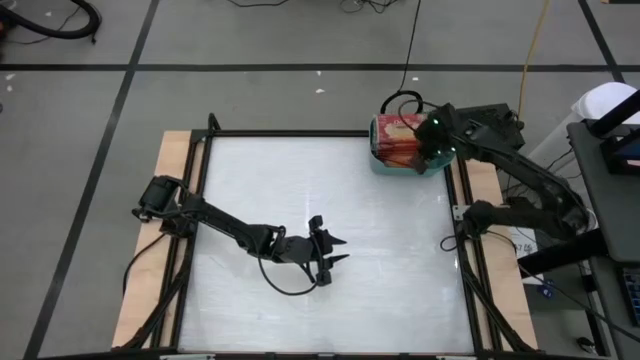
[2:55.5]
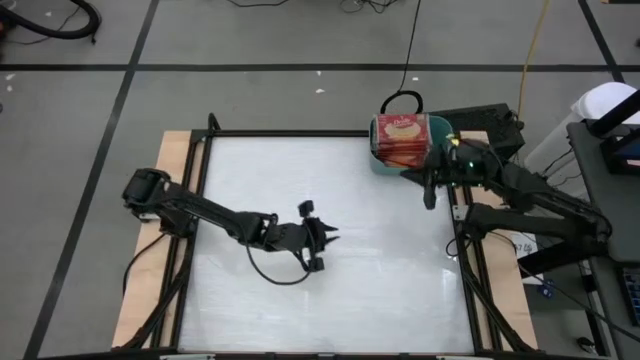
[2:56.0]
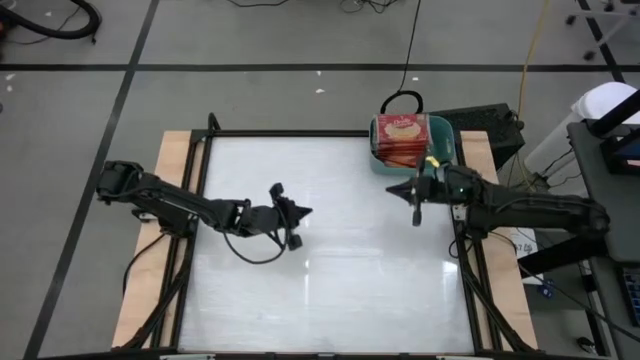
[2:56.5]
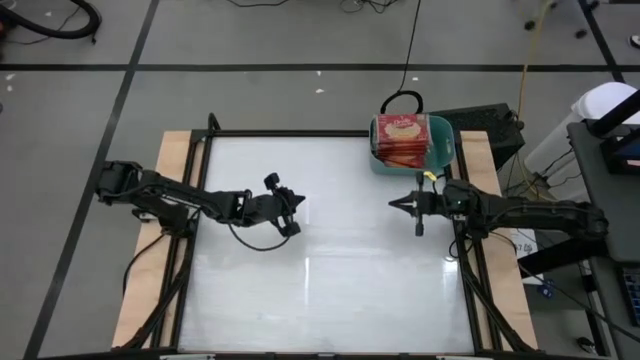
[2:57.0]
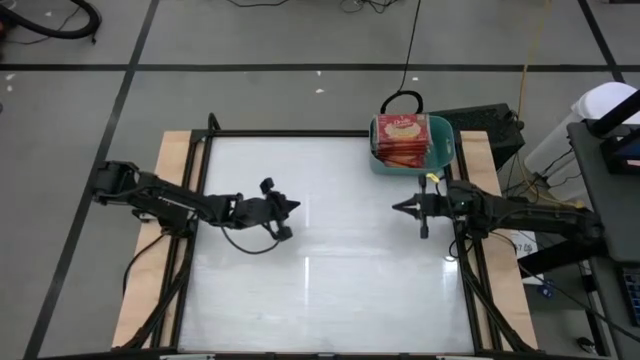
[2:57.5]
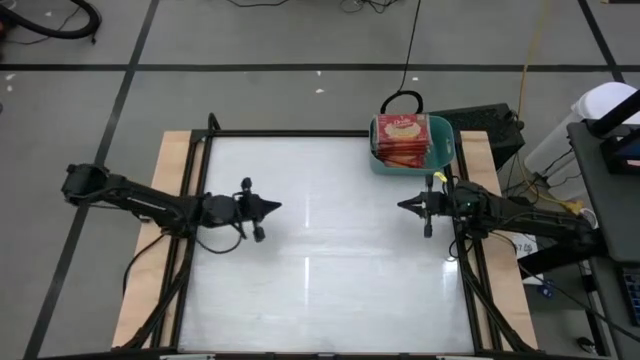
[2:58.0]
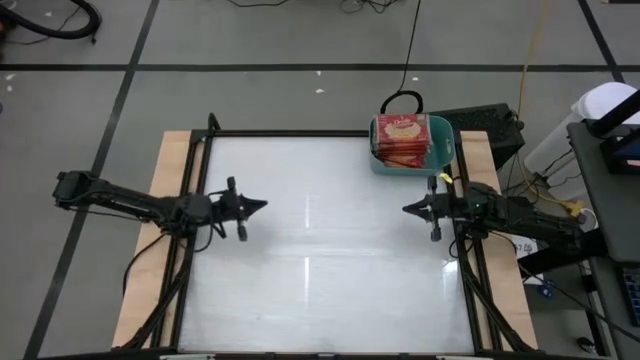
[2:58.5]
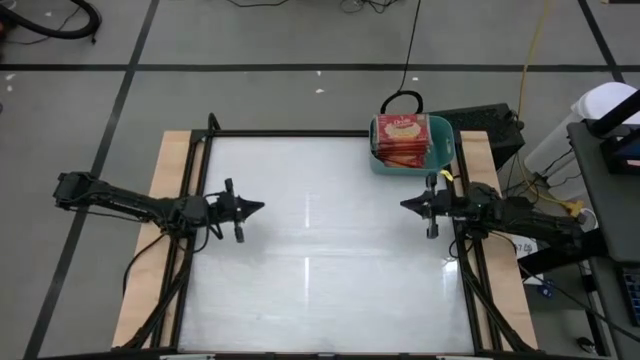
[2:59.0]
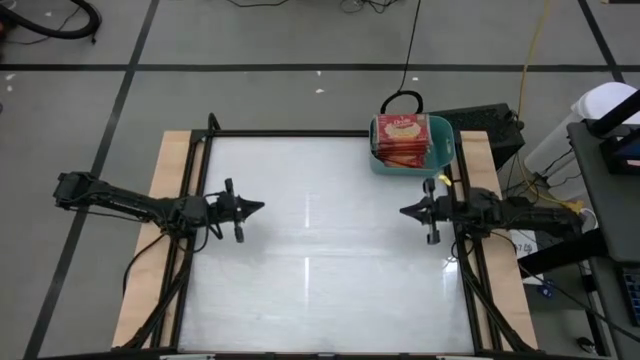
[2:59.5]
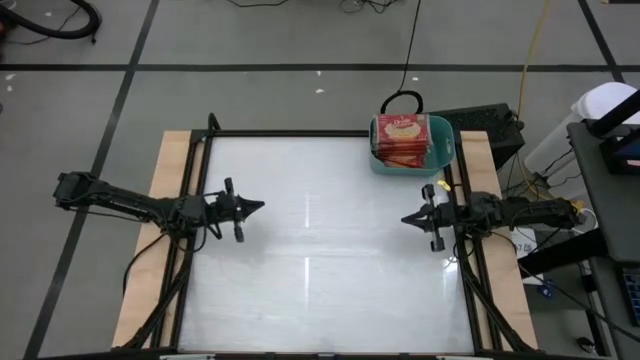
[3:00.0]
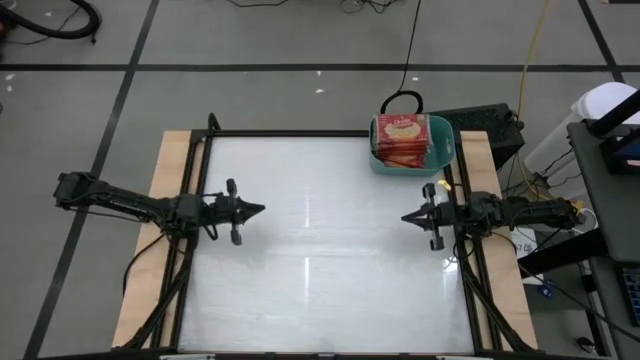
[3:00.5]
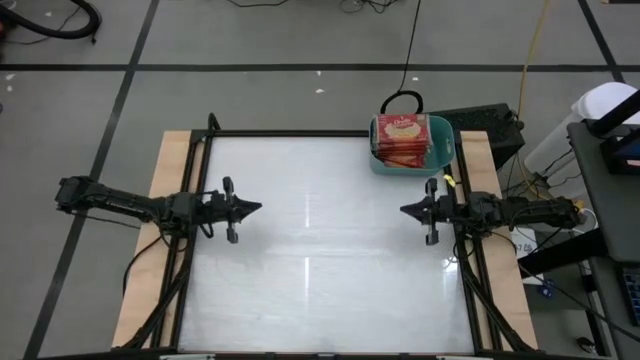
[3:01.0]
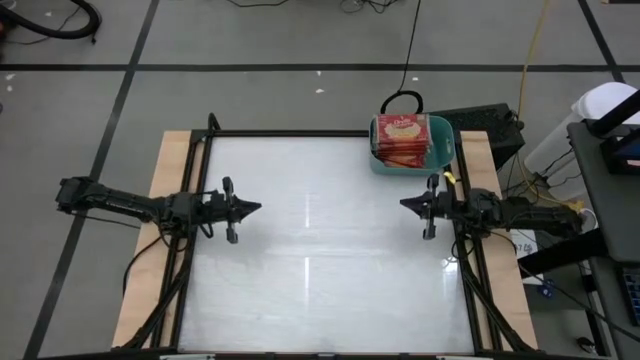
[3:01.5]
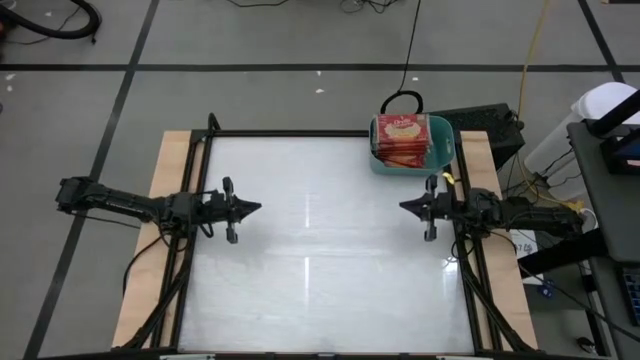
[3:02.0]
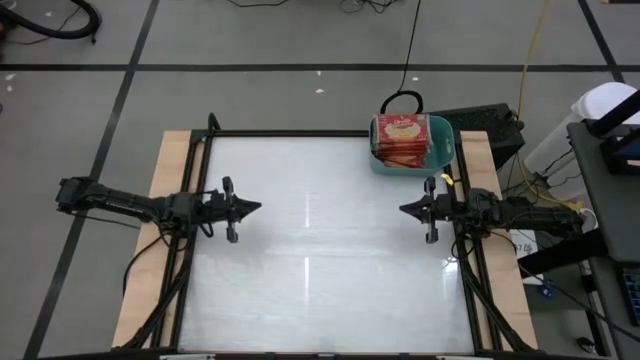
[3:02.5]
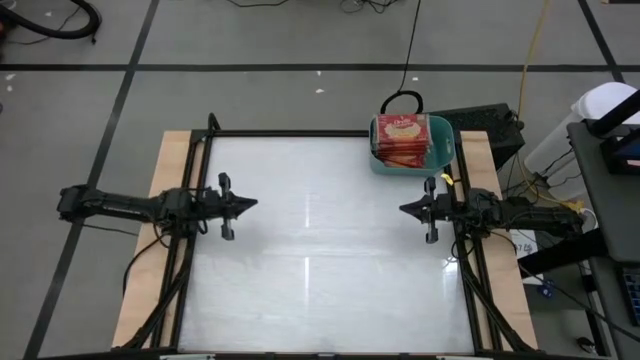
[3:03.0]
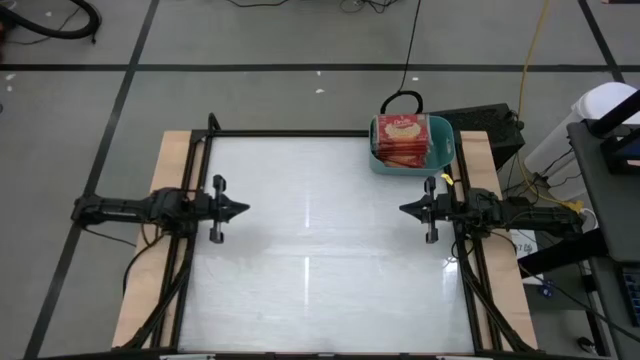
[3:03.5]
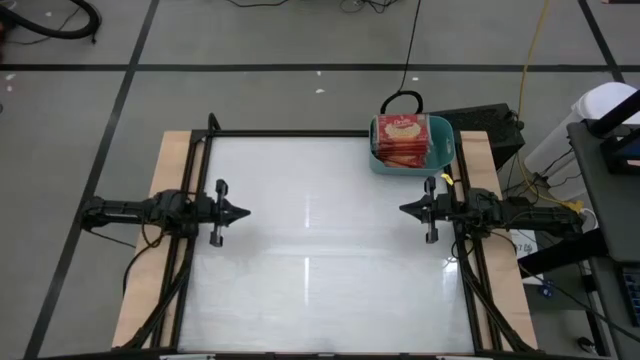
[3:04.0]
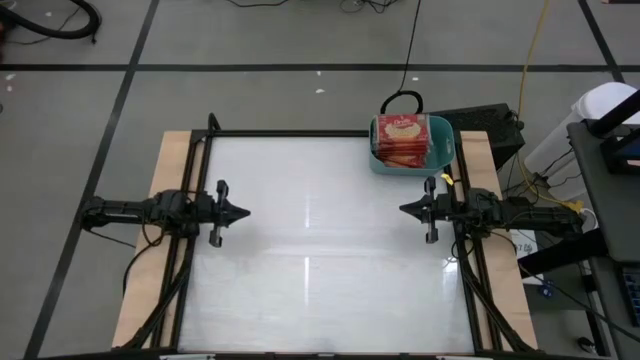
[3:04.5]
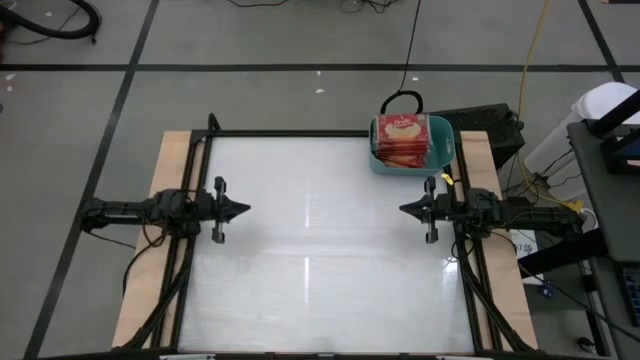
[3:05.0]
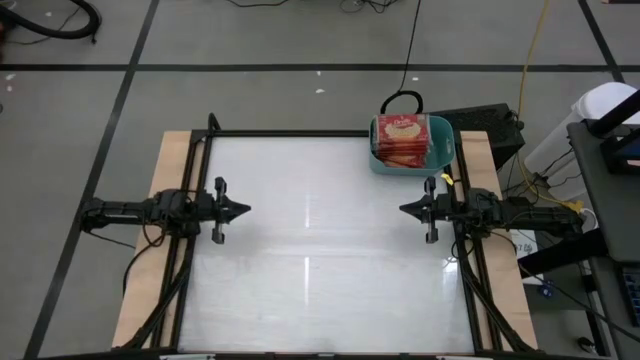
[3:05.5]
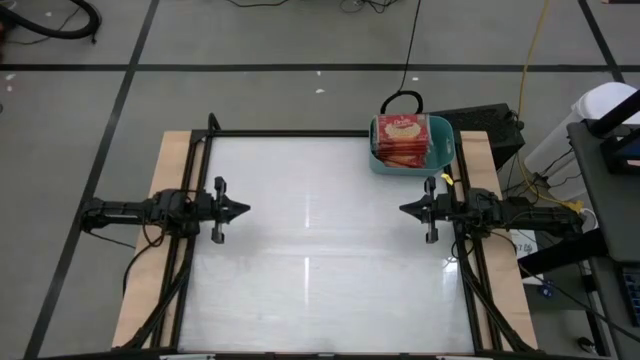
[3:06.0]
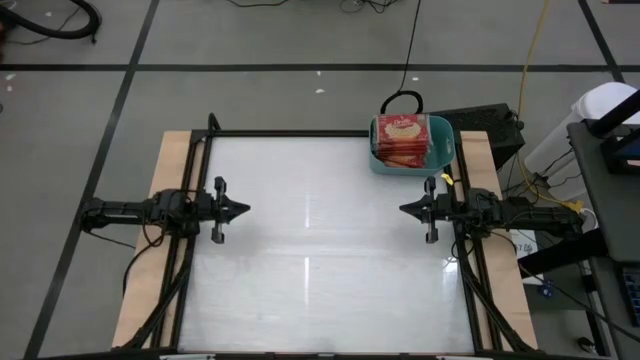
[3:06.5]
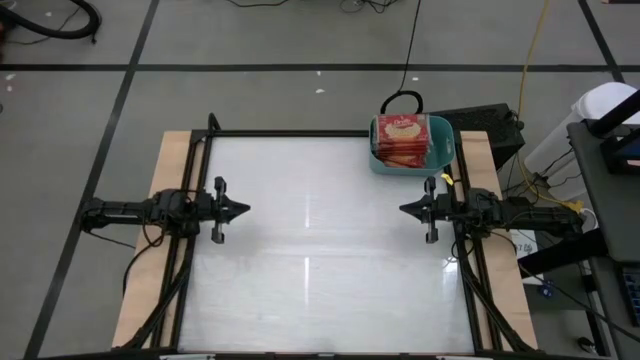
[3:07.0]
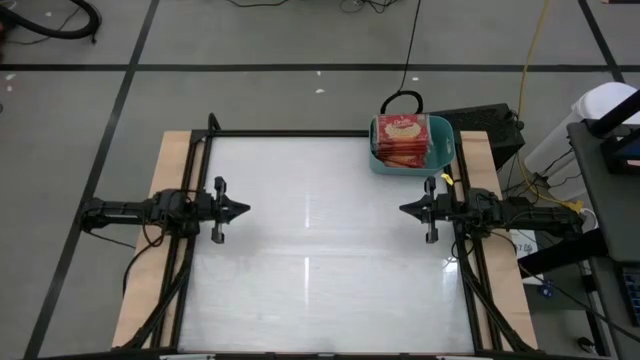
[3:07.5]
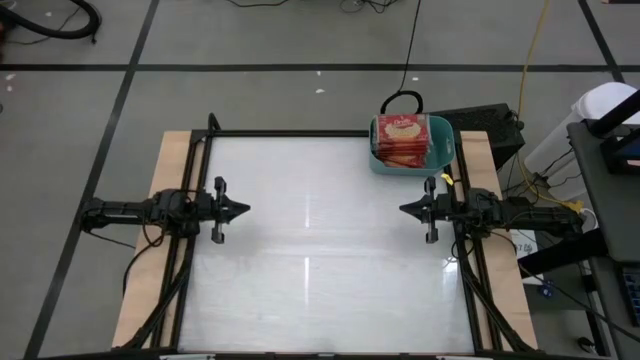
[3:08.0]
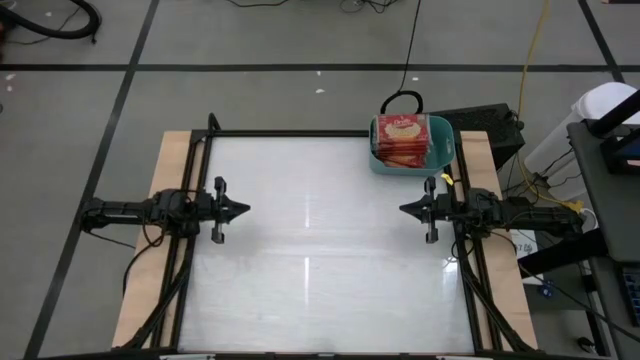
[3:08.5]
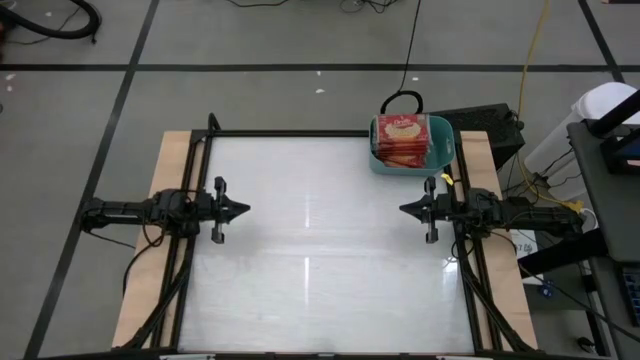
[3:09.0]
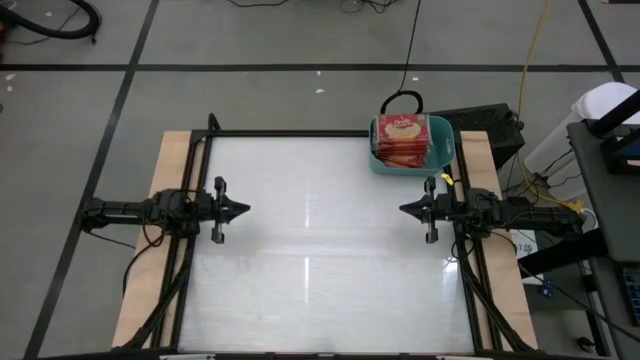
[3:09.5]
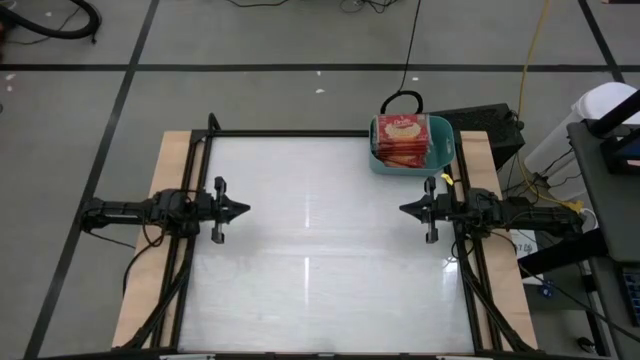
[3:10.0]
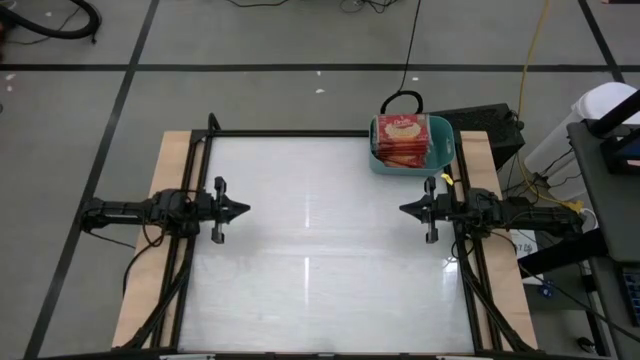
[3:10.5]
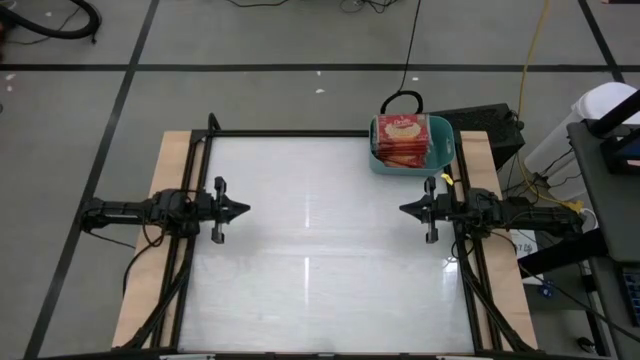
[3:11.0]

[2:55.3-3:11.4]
Task: Sort popcorn bags into baskets
Return to Home Position

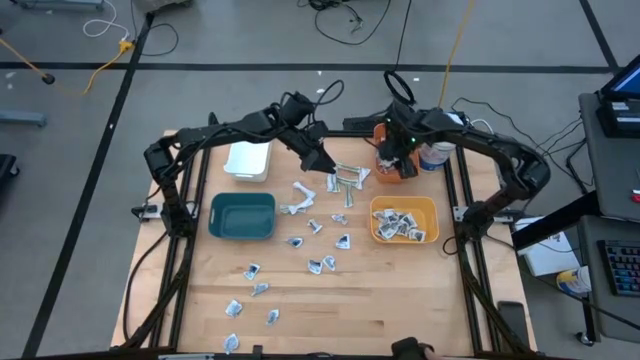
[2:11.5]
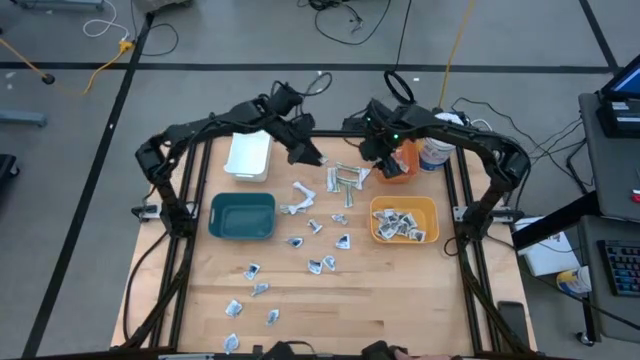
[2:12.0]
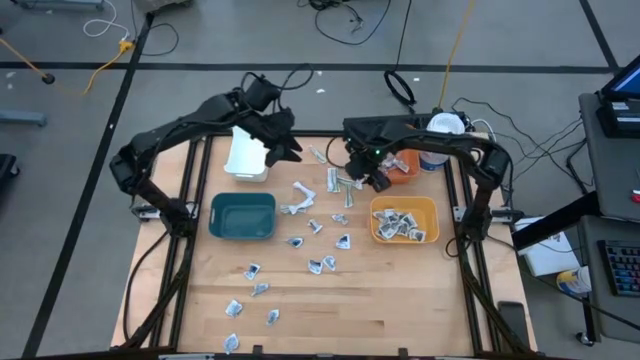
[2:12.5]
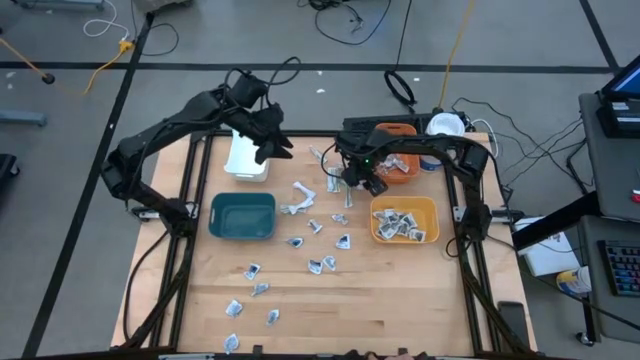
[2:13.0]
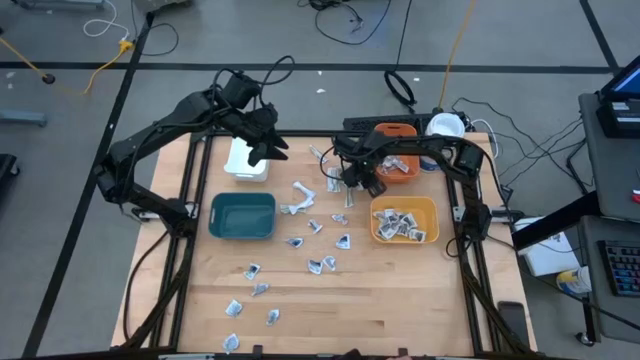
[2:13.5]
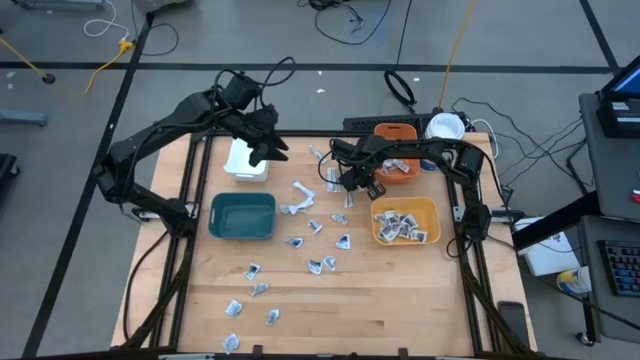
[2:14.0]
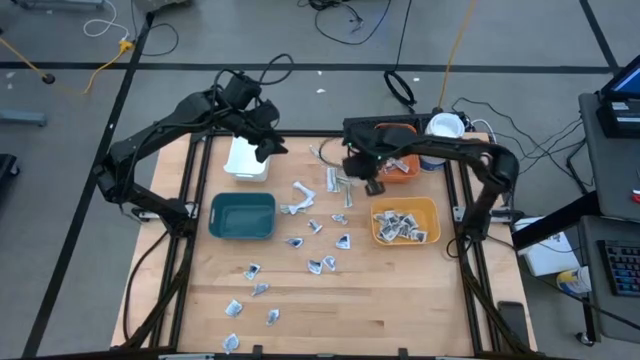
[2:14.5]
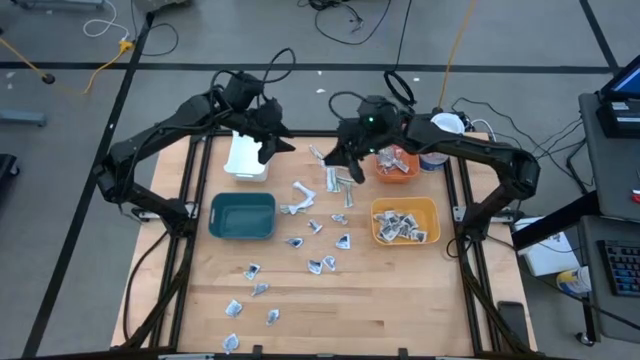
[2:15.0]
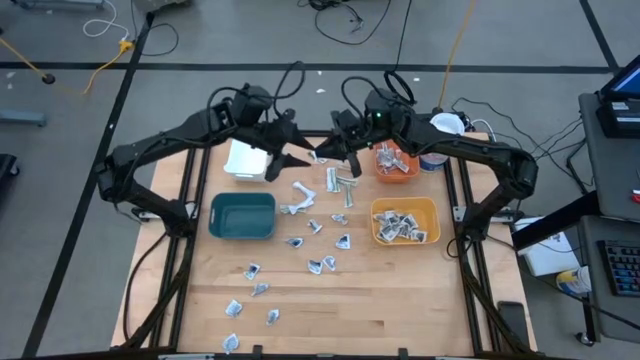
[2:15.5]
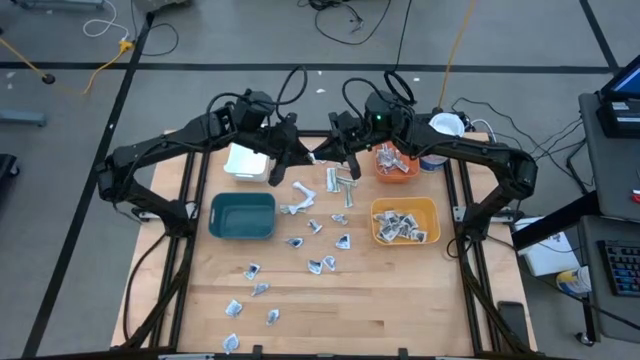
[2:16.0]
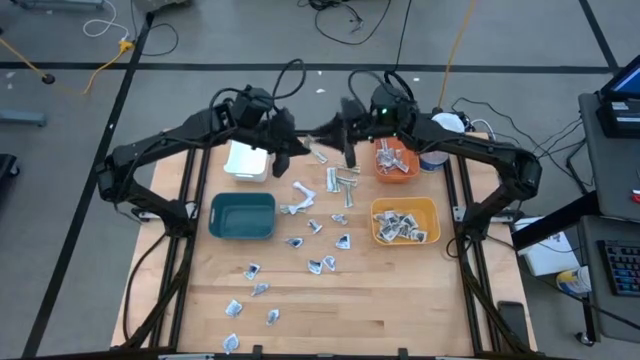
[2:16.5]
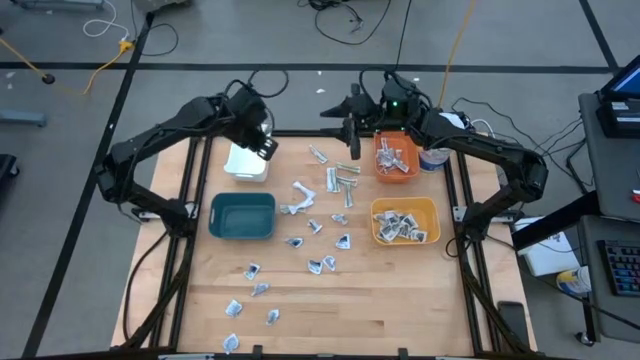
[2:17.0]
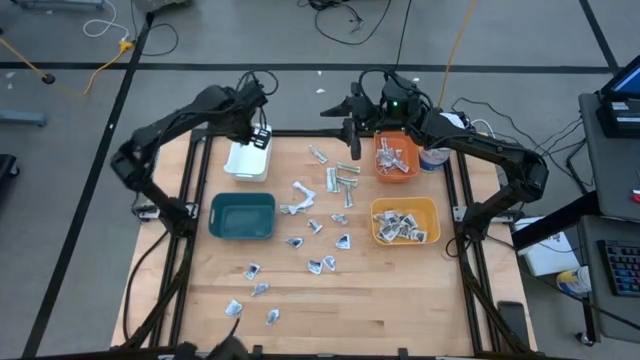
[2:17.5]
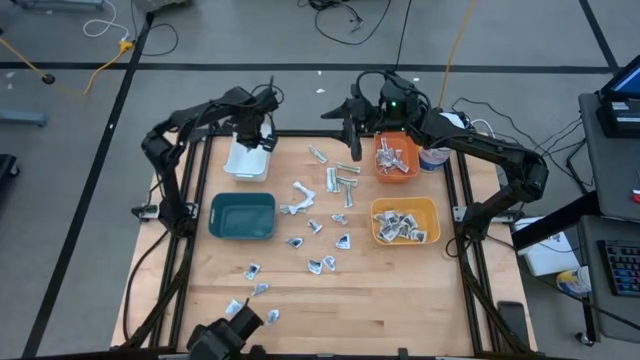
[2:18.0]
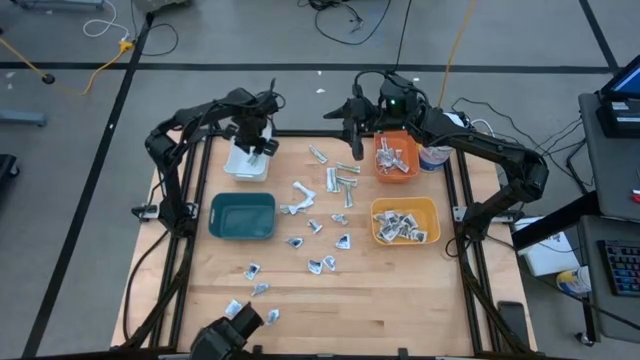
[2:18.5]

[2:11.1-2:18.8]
Task: Pick & Place First Aid Supplies
Put the bandage into the white bin
